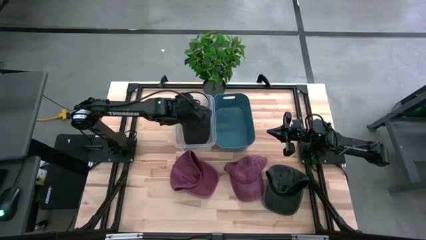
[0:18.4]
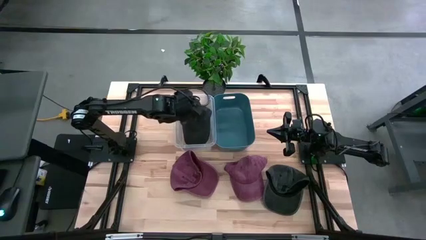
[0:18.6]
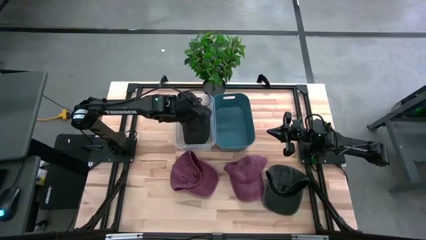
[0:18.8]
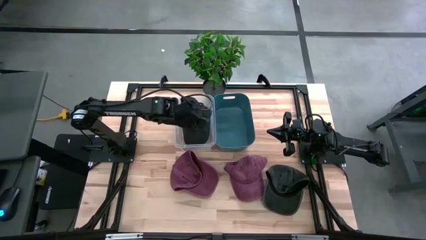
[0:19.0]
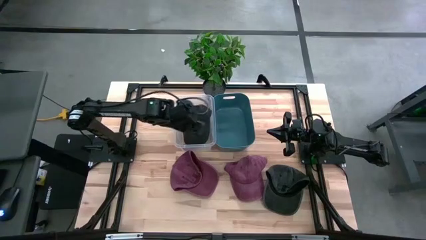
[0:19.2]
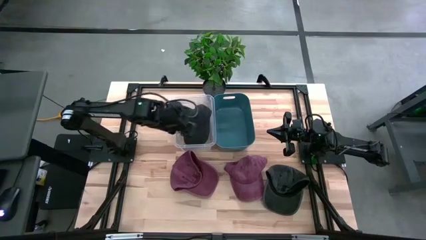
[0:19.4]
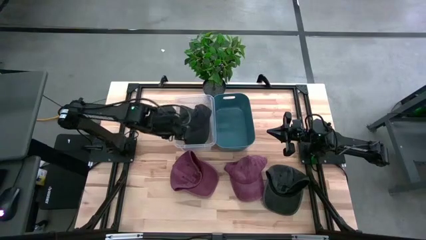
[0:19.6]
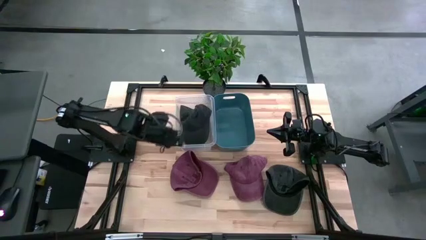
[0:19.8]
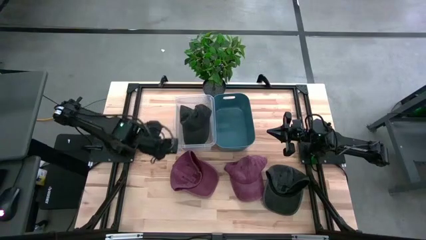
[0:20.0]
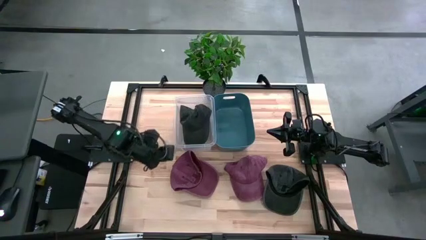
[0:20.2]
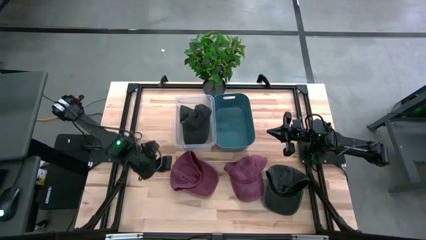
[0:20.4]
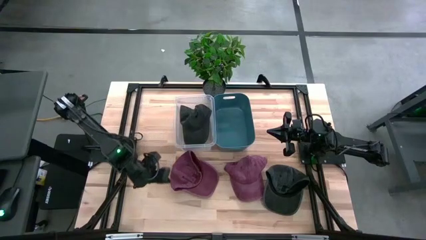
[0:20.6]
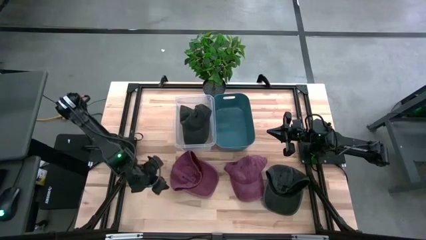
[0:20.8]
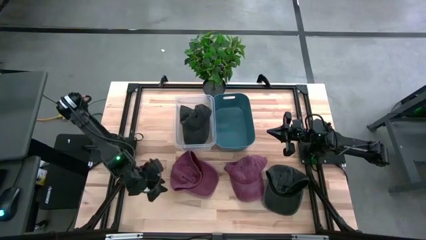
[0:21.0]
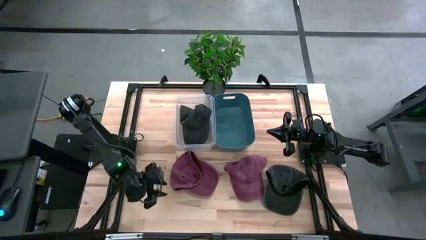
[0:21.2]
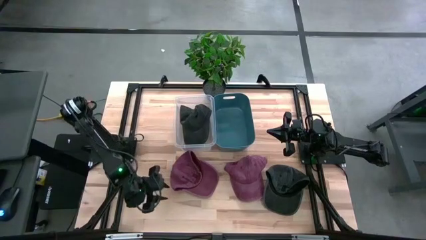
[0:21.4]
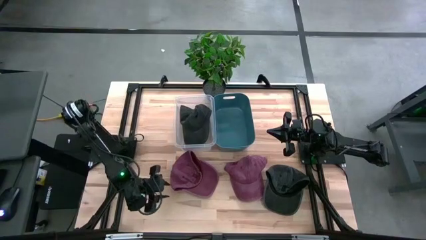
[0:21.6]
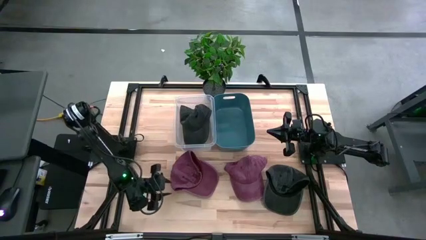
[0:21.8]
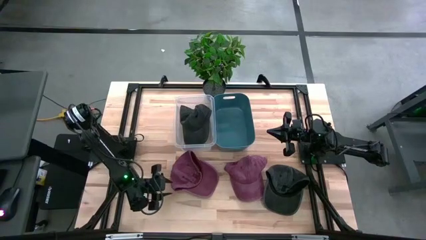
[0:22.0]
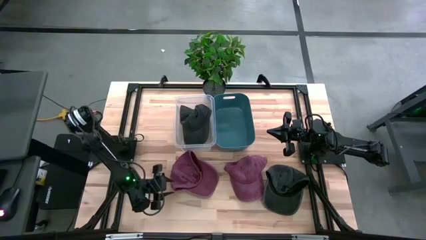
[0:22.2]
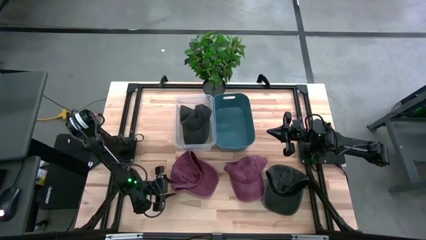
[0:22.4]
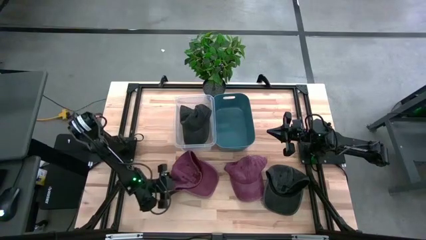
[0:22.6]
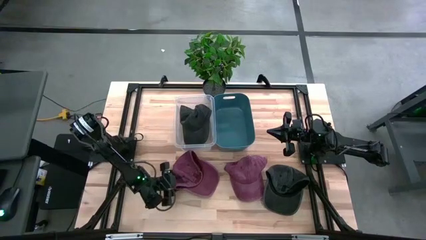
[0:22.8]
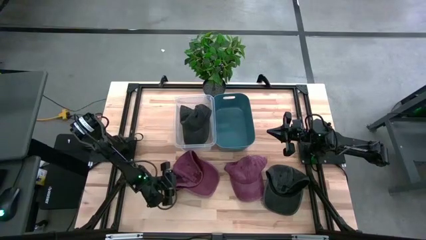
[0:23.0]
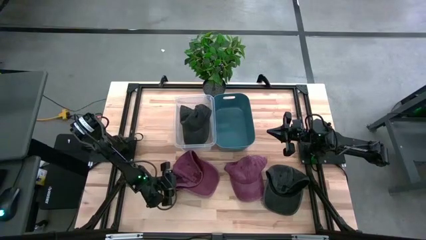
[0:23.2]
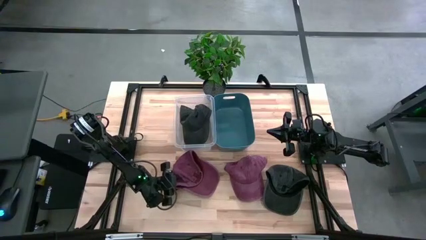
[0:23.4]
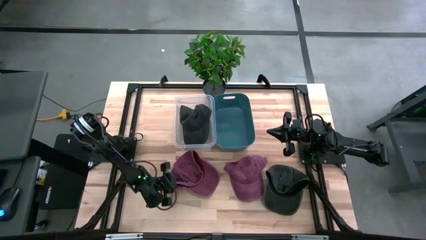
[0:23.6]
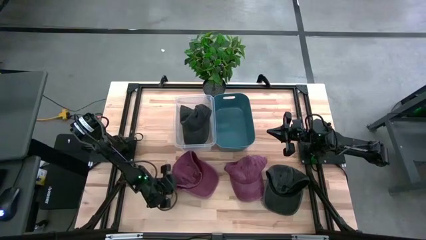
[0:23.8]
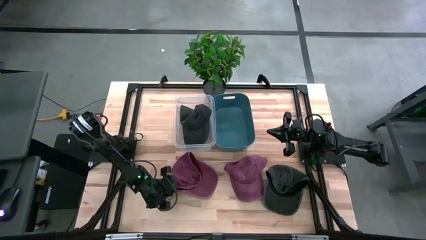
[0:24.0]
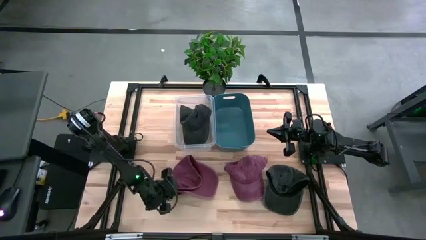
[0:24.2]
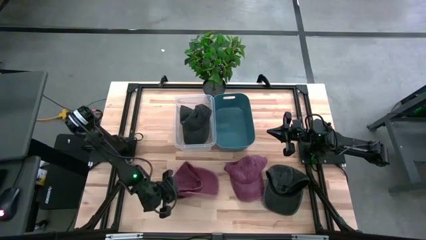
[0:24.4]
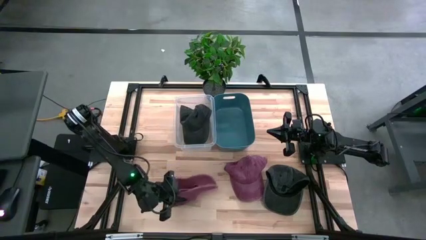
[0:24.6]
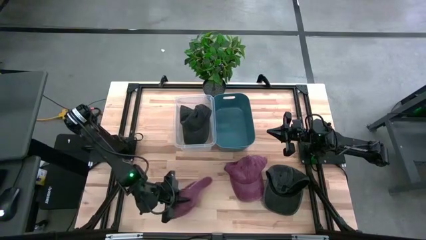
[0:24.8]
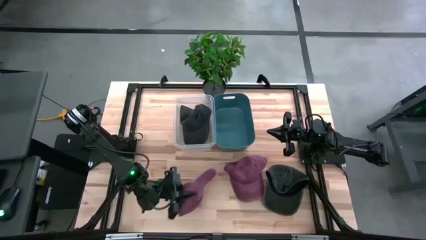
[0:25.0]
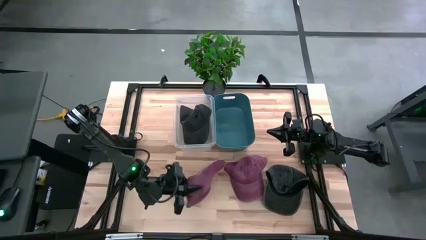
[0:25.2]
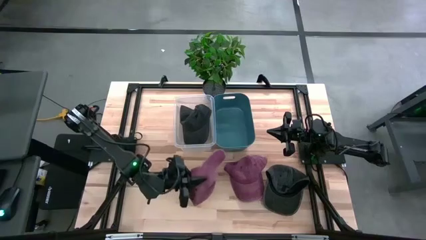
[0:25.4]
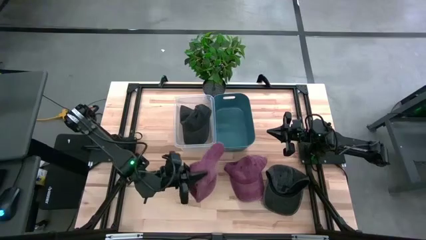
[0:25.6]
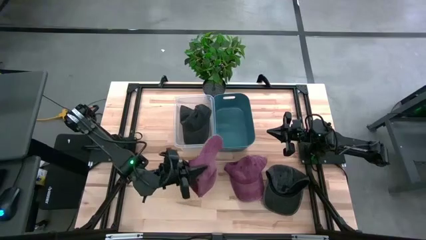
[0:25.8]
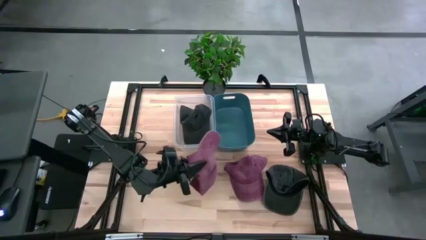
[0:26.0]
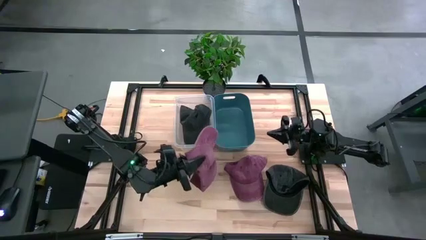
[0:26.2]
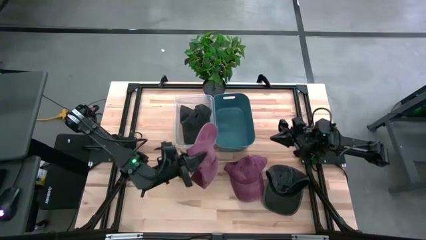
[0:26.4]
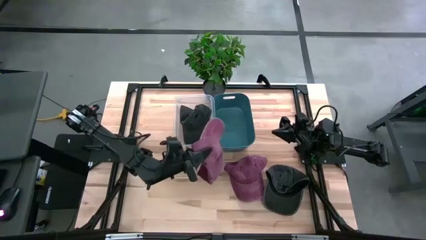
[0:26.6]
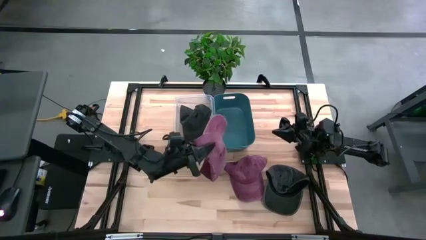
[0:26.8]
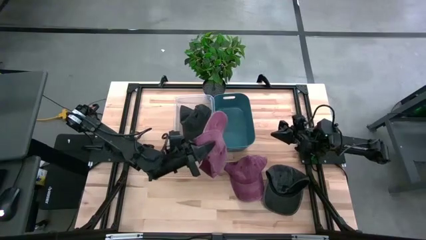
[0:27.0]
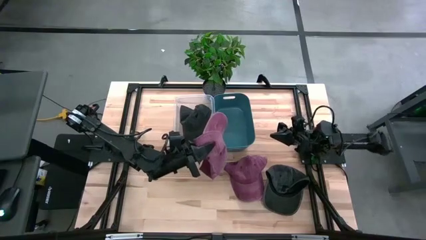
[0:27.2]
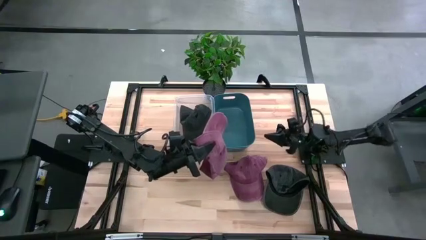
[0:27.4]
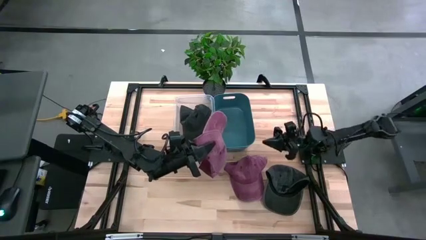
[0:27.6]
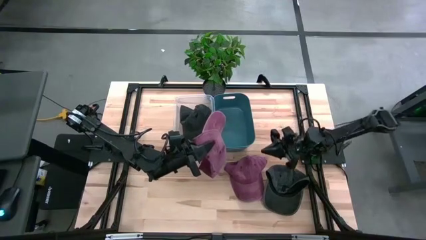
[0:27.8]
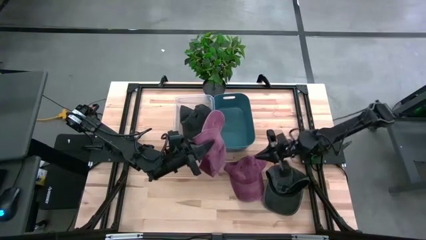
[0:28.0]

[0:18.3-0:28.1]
Task: Pick & Place hat
Put the left red cap into the blue bin

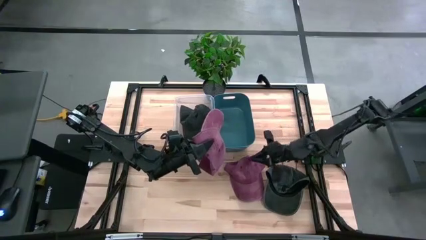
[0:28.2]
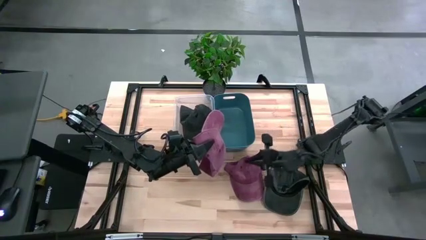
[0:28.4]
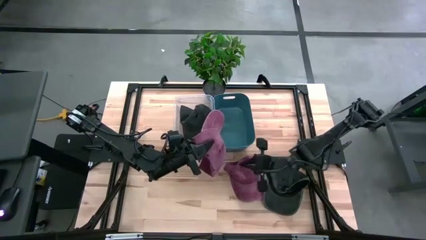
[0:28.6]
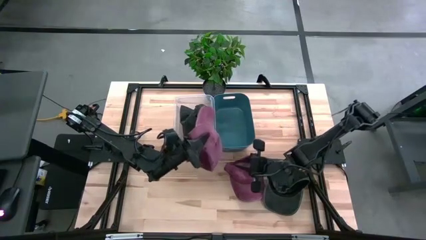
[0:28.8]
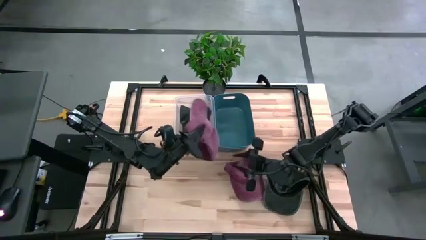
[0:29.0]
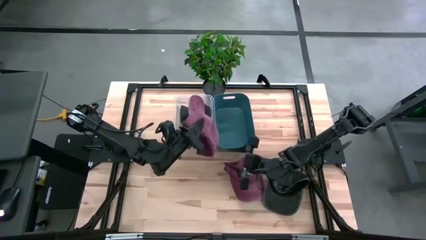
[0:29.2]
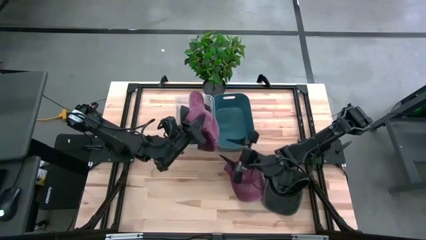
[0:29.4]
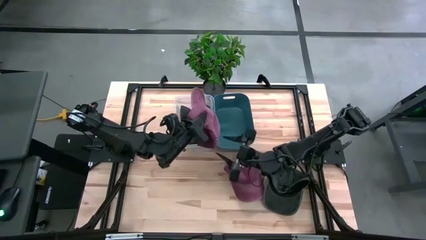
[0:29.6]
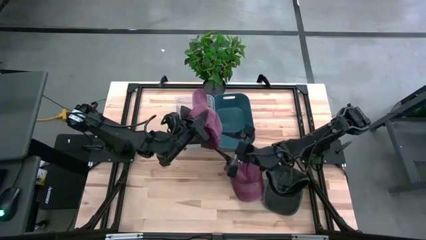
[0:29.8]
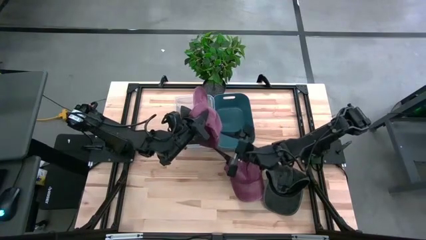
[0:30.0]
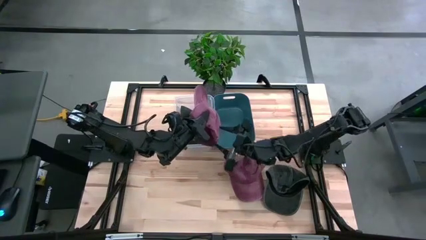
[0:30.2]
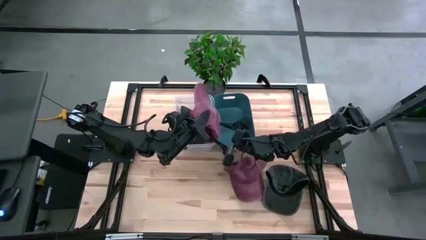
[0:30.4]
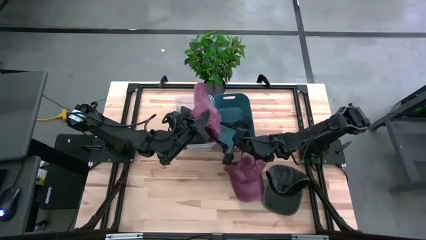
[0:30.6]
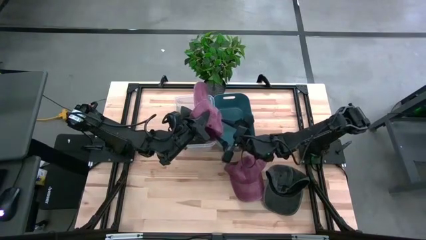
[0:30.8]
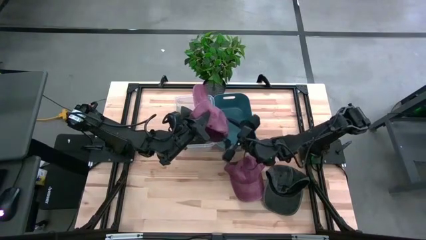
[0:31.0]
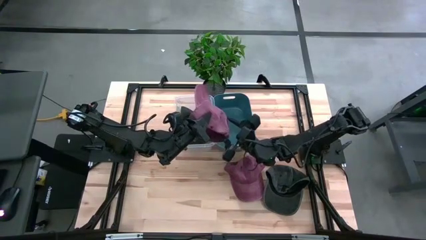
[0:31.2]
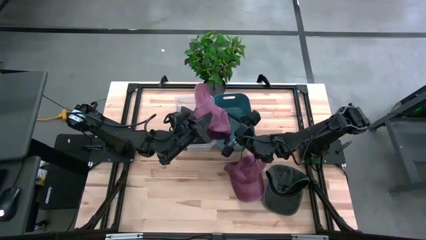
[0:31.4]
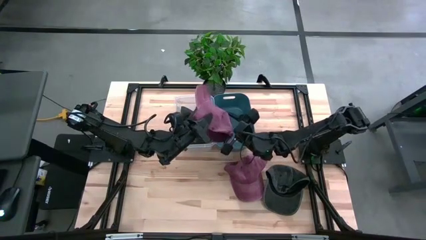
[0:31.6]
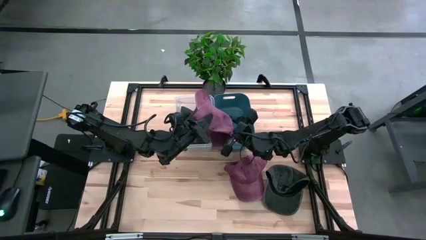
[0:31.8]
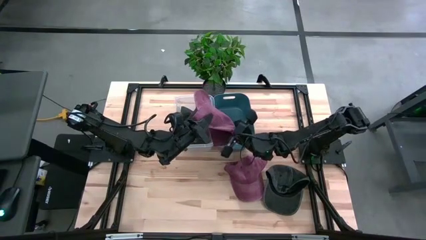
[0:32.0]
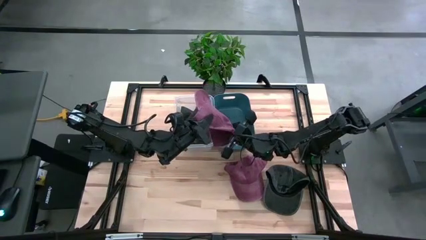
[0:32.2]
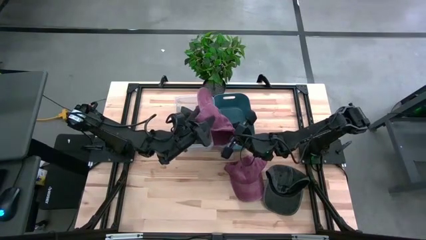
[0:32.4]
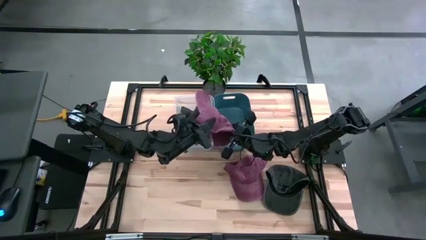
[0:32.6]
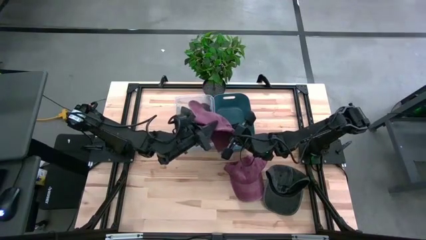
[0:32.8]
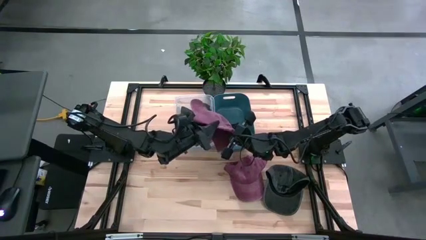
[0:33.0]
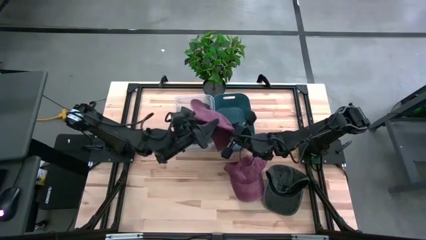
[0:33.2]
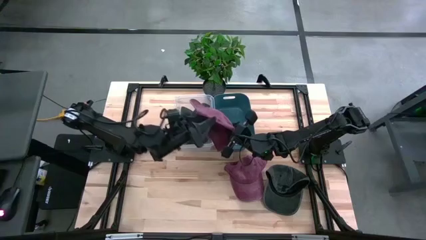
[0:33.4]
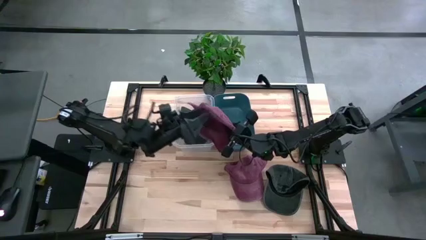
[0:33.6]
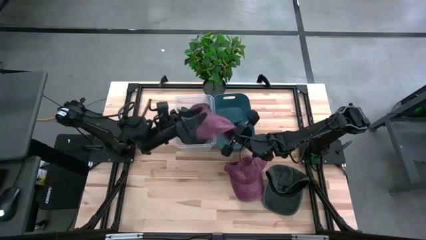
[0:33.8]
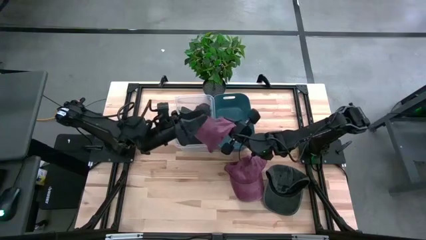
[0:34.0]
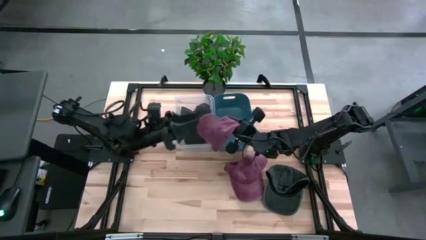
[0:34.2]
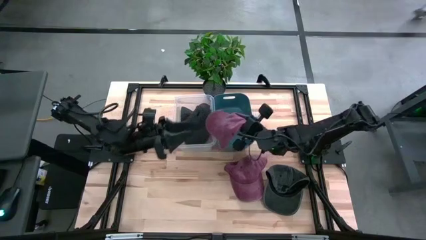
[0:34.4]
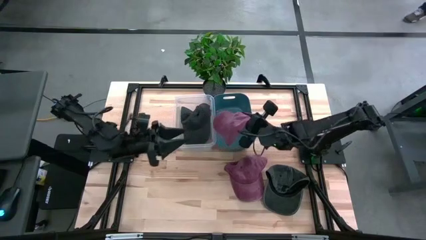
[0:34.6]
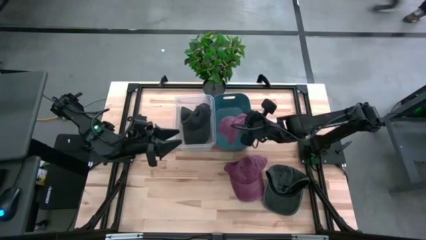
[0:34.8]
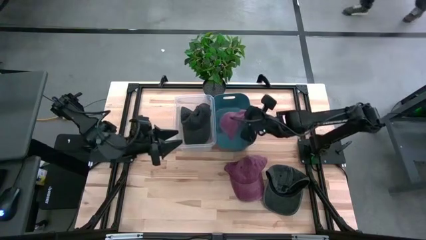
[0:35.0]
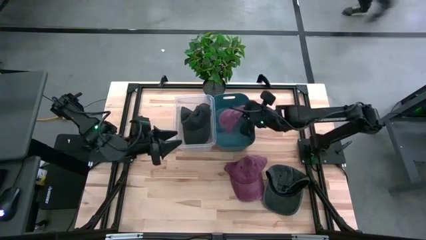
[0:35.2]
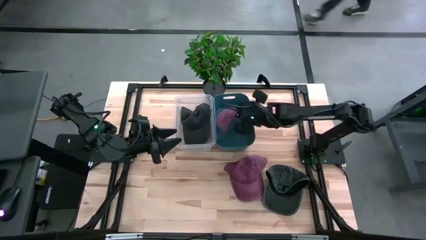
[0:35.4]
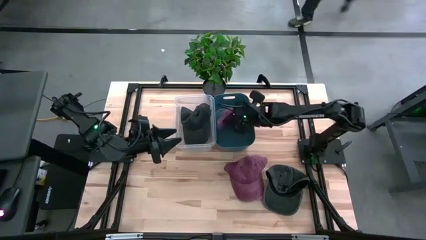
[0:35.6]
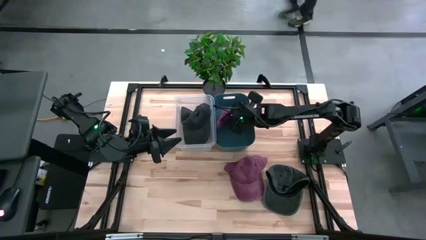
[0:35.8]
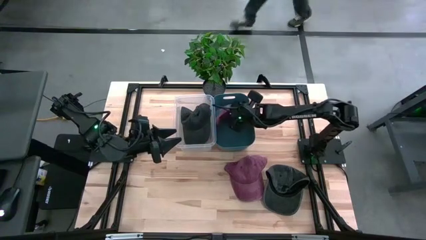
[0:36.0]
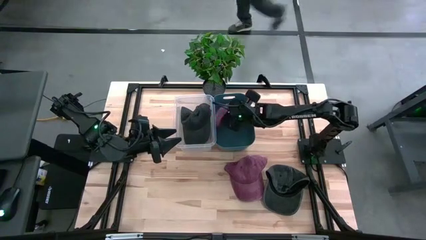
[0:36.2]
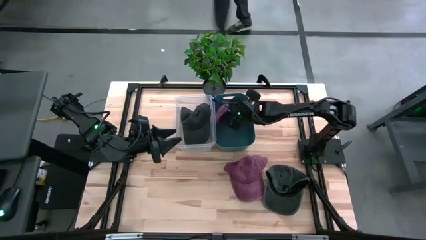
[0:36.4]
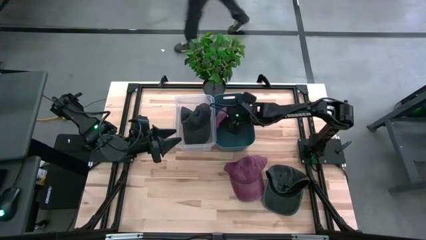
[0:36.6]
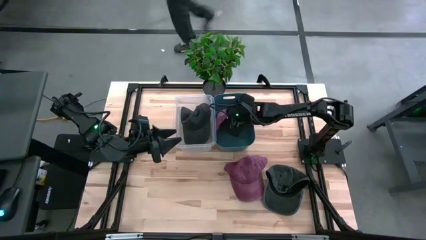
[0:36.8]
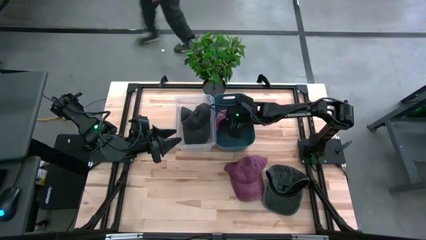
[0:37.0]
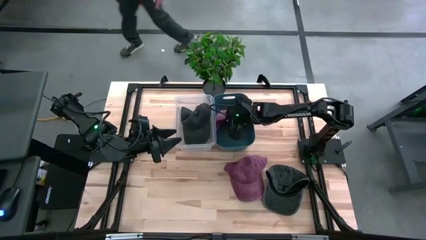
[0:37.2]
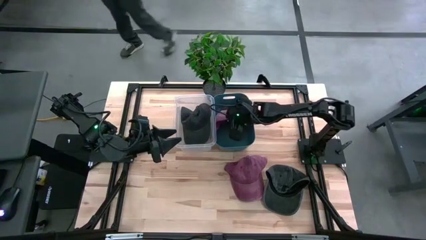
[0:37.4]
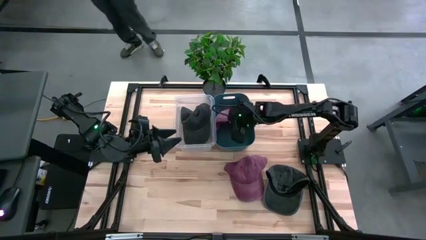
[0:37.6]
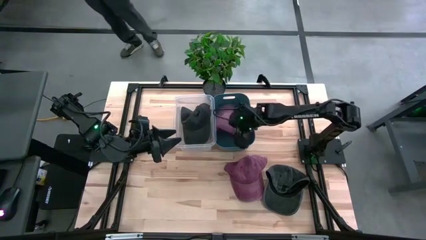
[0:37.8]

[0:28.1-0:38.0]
Put the left red cap into the blue bin
